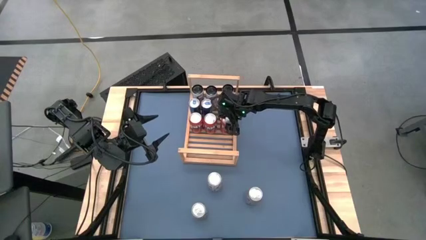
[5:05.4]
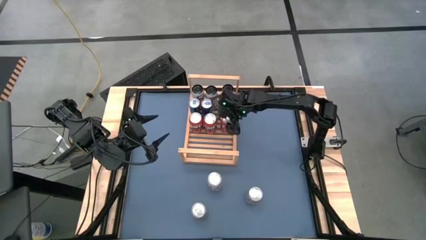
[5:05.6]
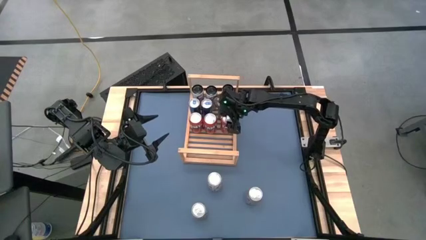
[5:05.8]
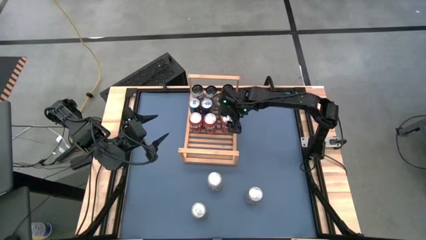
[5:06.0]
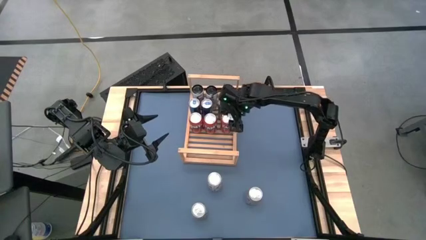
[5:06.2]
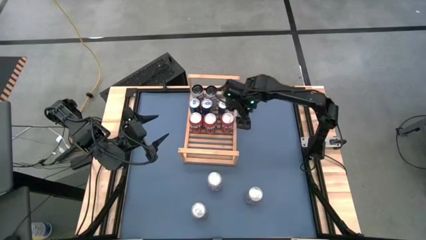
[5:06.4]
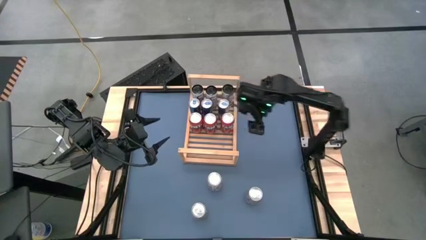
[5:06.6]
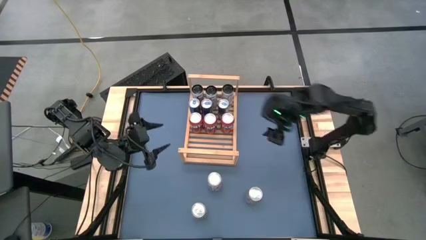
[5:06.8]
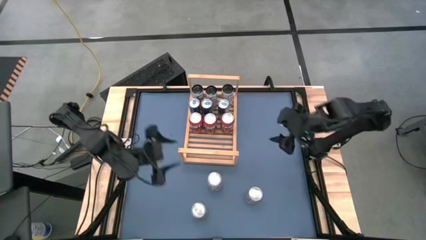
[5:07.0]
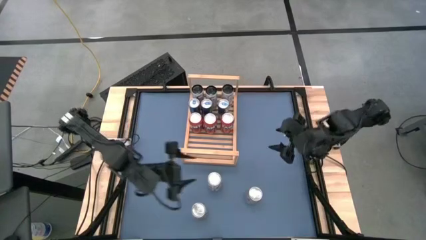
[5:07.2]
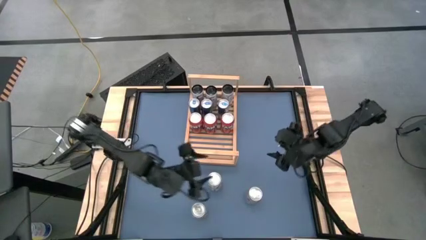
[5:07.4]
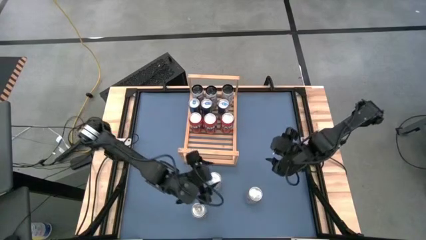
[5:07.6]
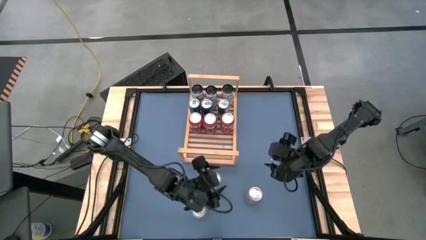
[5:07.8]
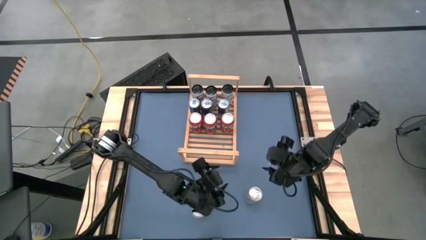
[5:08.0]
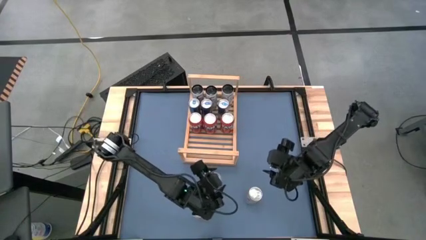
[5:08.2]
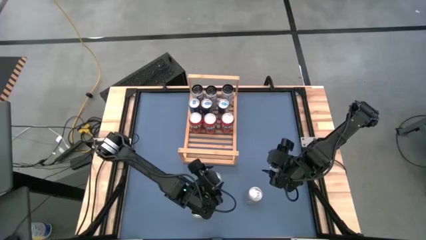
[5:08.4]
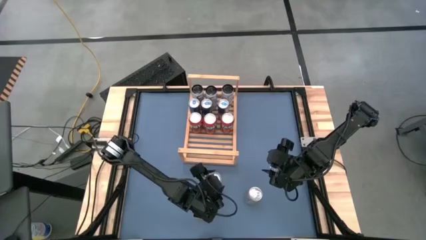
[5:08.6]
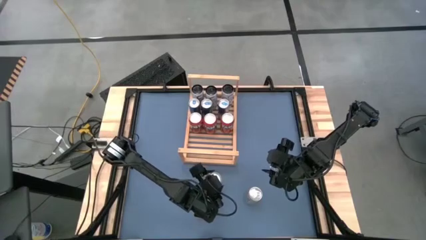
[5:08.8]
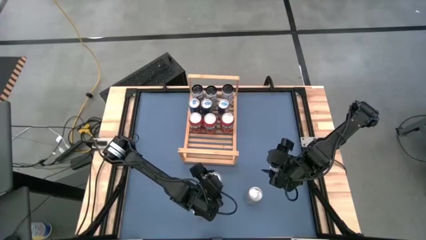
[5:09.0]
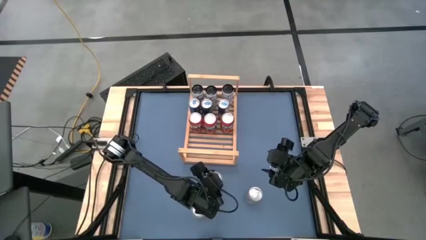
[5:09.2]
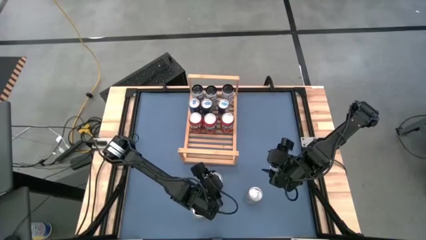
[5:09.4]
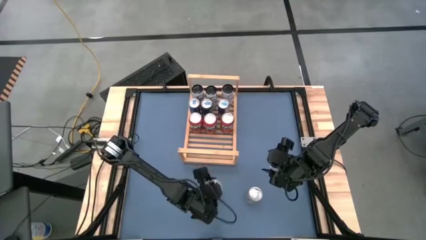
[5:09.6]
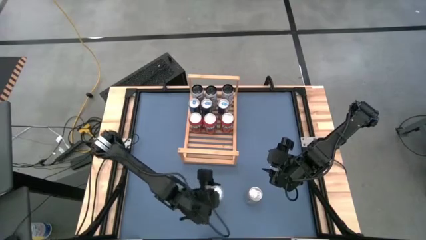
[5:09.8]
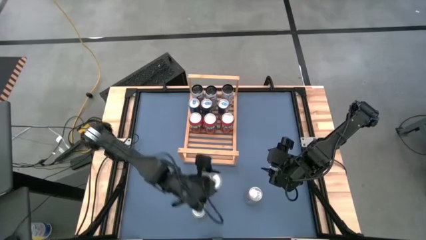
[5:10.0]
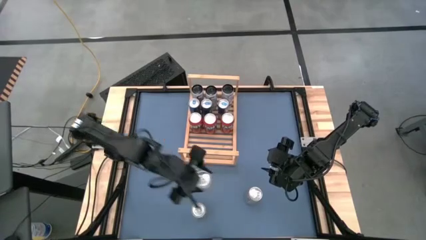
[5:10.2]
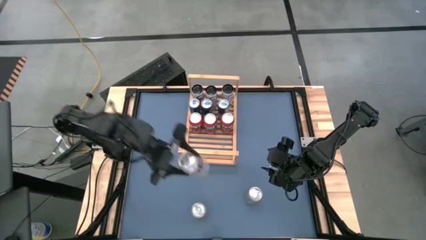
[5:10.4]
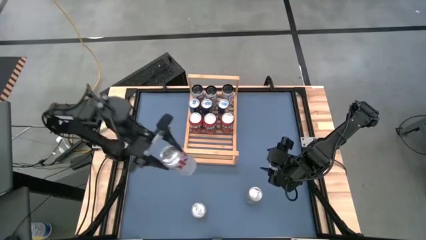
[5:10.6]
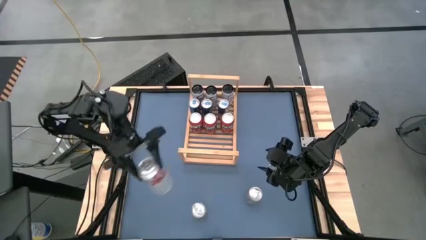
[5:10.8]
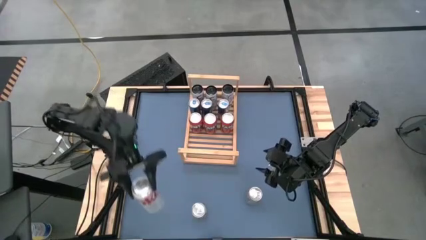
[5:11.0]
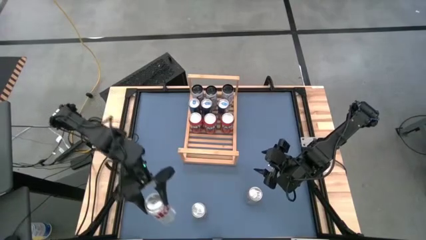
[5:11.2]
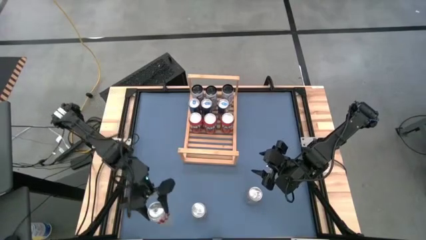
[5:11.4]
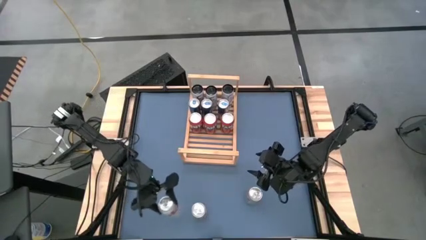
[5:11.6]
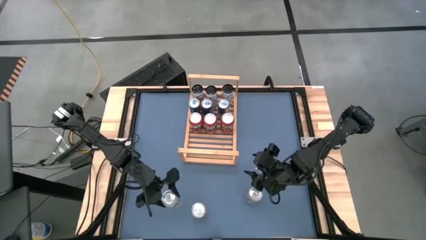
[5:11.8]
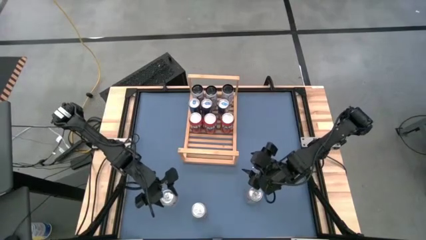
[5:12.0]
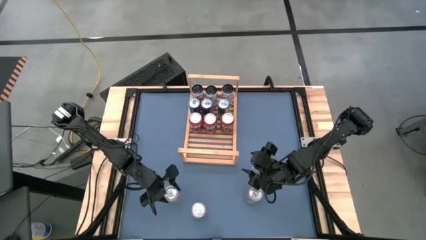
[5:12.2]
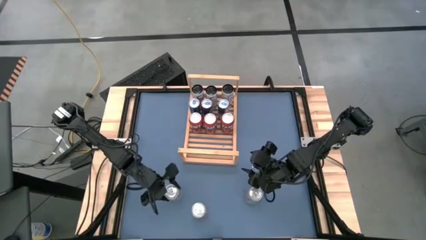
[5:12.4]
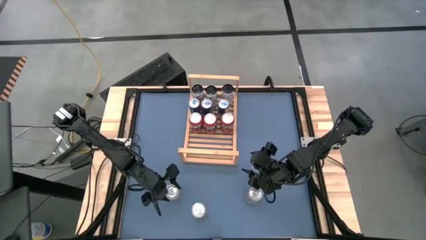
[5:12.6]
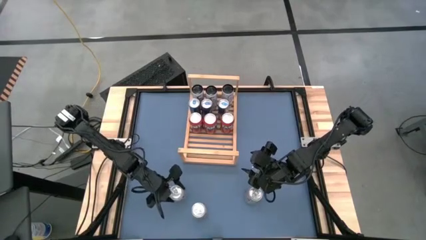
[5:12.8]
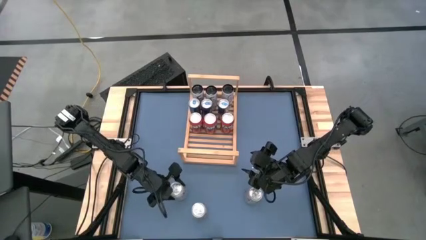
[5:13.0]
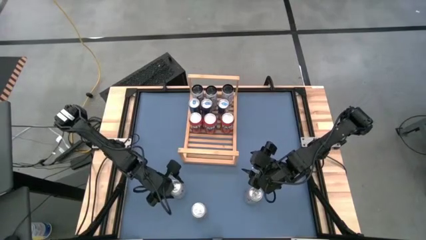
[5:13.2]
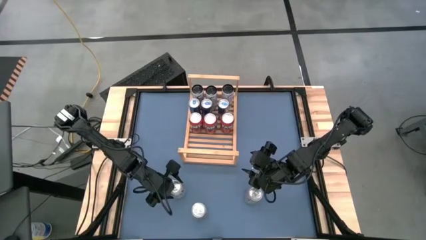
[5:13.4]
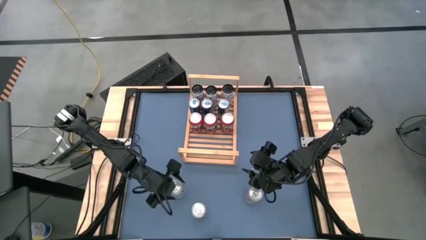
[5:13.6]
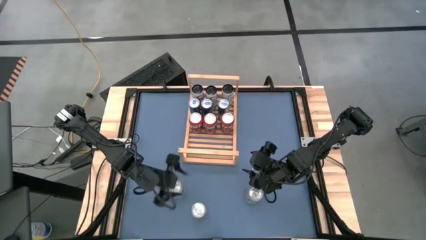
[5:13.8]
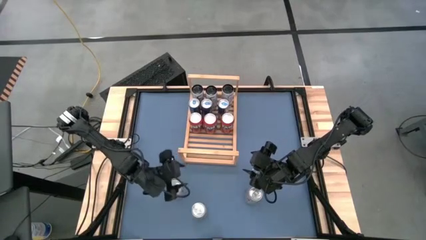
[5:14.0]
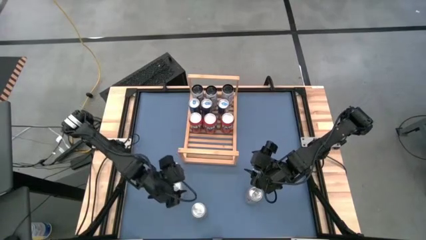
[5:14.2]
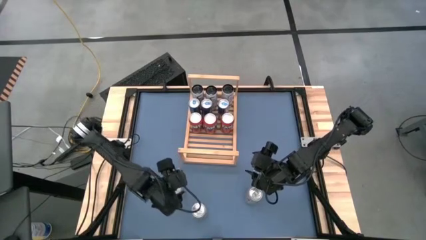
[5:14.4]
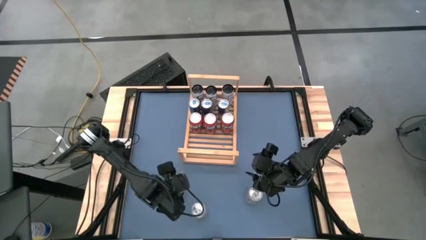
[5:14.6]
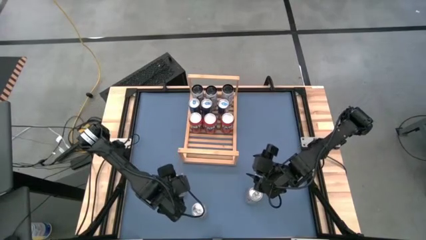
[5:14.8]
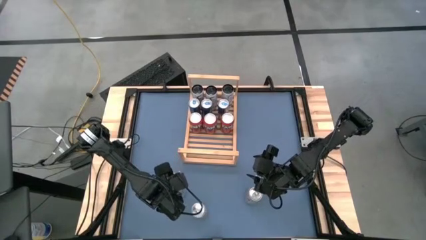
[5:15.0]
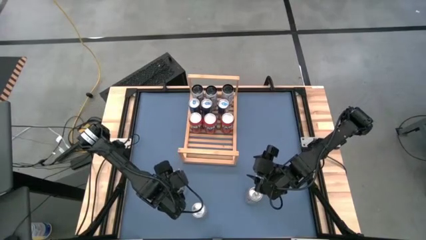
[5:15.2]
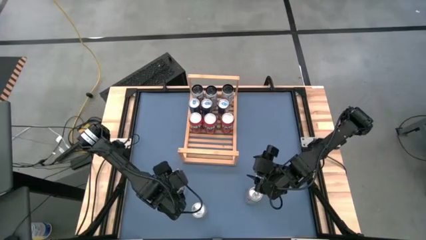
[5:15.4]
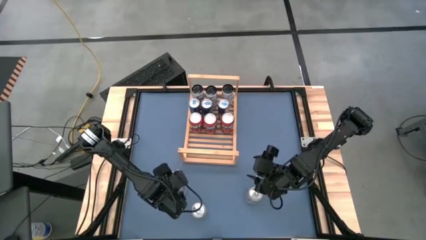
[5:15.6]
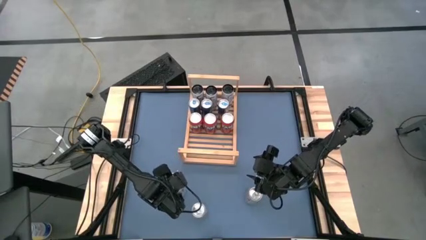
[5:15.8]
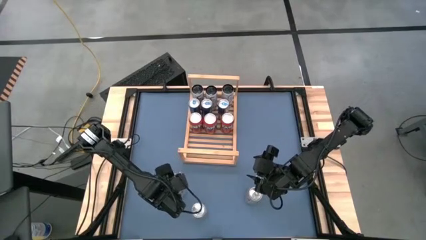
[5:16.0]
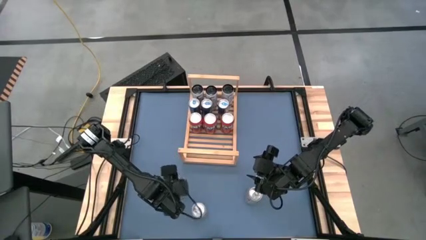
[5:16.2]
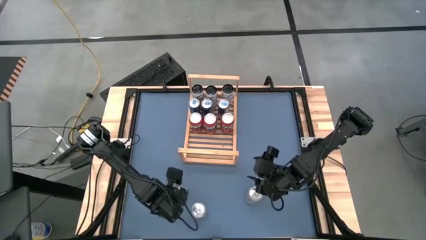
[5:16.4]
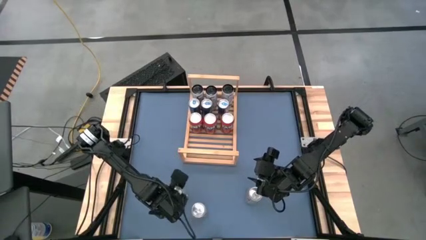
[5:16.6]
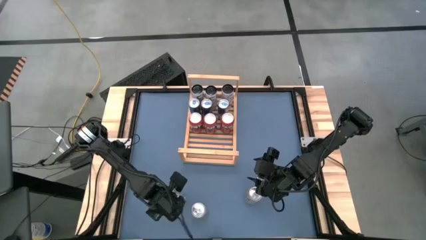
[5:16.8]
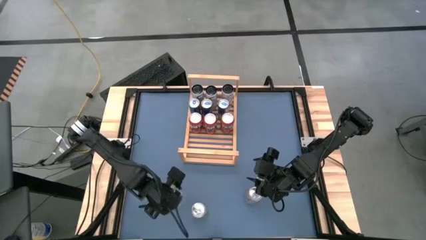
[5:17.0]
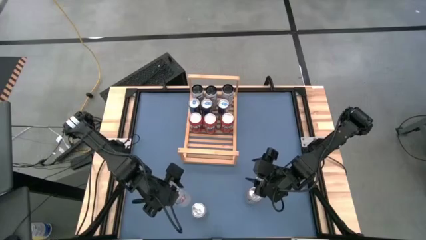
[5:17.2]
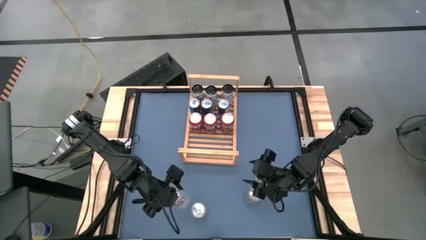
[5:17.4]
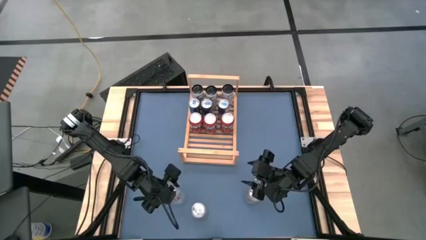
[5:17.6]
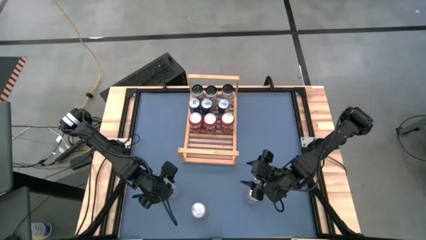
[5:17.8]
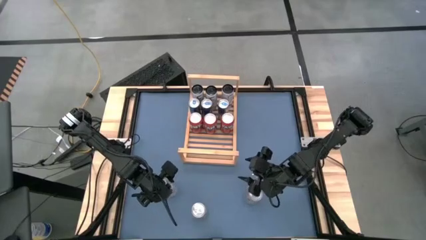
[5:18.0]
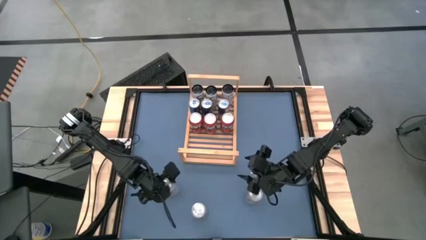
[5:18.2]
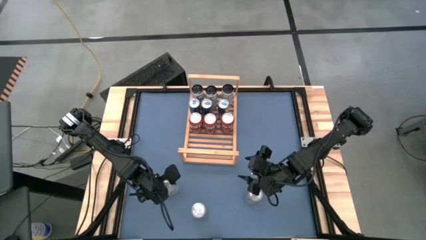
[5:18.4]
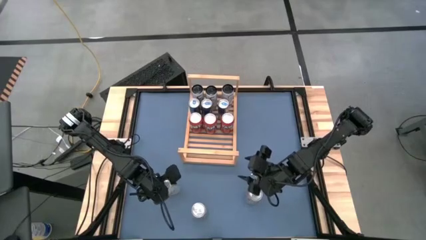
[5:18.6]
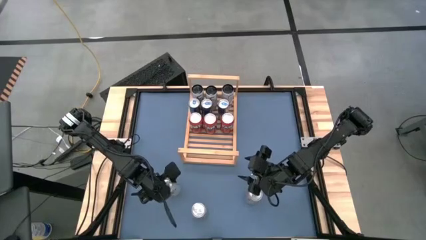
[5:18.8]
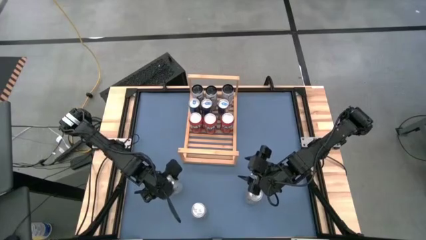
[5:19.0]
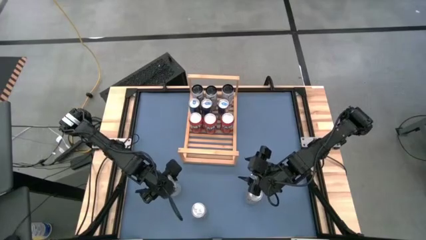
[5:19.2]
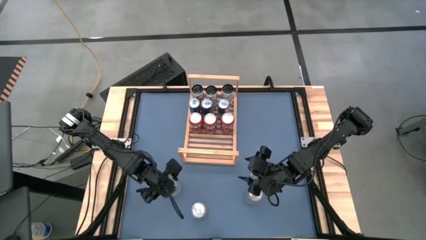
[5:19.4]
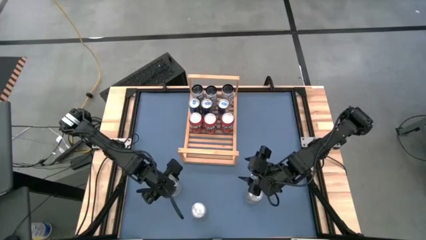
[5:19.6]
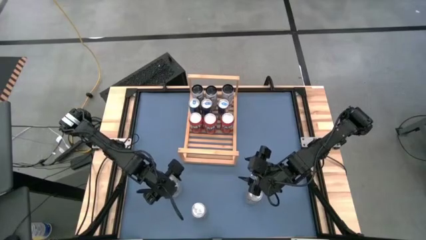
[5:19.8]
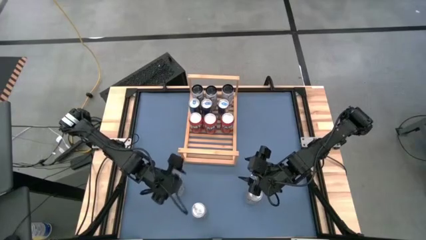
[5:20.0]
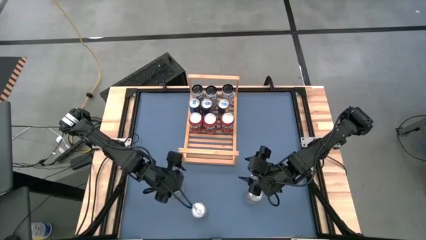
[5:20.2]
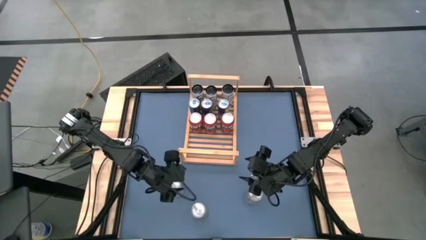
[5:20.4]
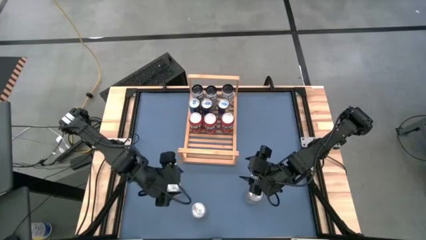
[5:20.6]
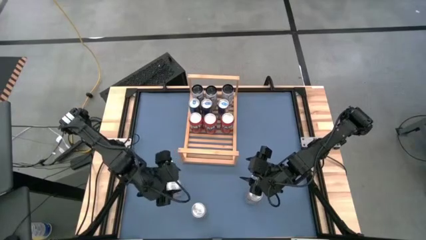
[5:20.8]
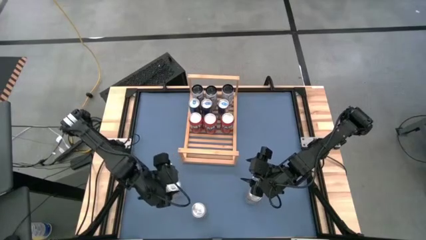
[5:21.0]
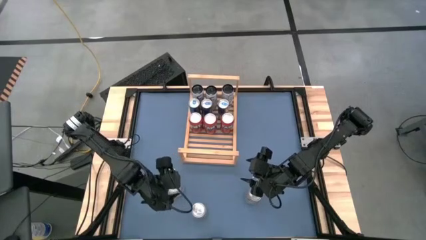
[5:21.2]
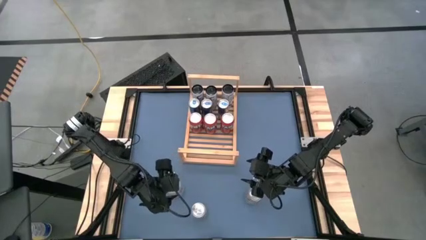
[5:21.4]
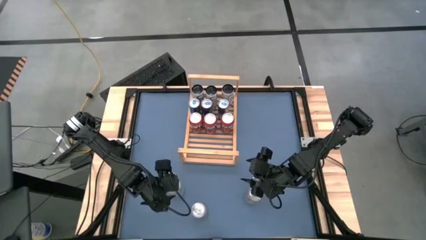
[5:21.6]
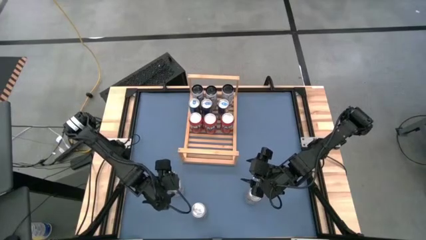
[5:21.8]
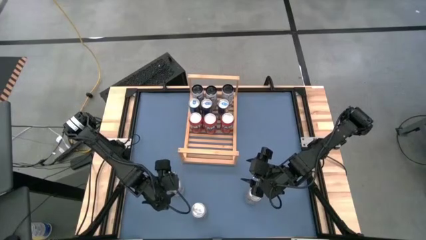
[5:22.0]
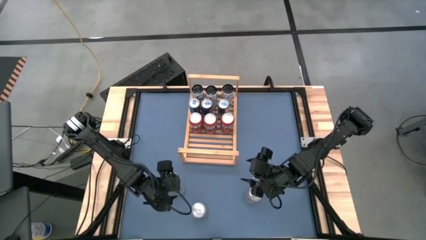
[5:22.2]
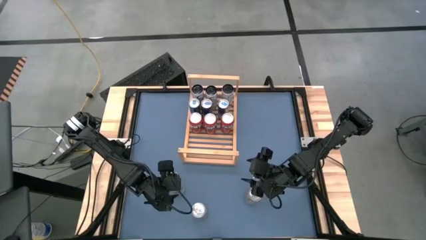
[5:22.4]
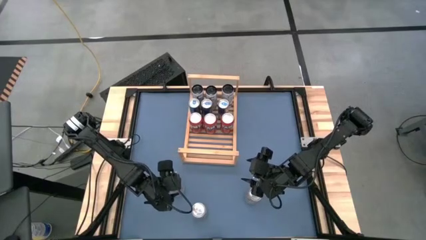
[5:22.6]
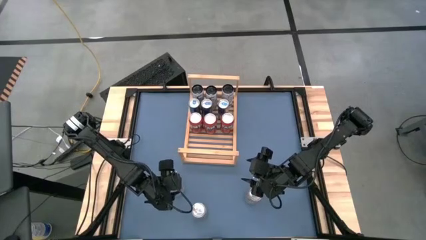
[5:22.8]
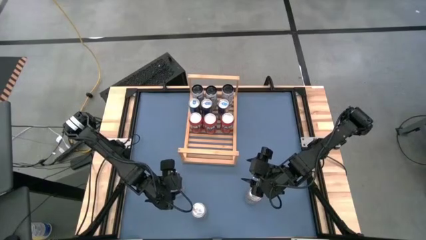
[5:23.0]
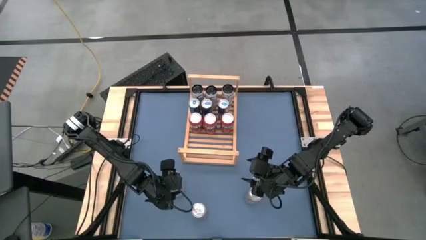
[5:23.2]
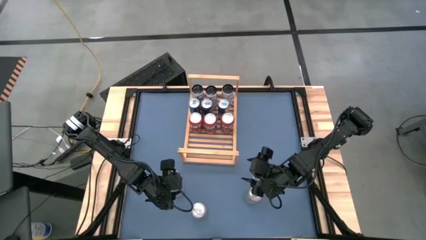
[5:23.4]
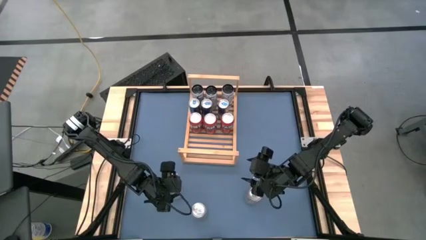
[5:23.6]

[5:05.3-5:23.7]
Task: Place canned beverage on shelf
Put the top silver can on the shelf
